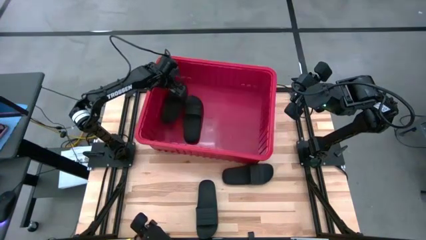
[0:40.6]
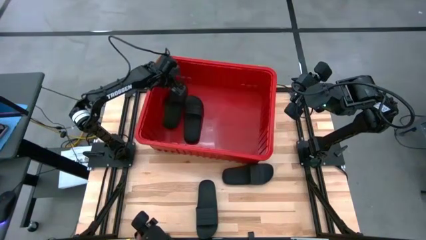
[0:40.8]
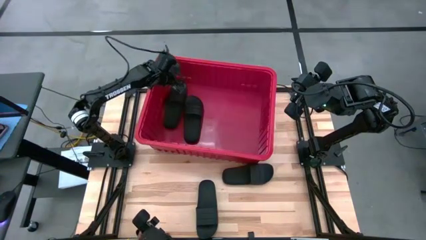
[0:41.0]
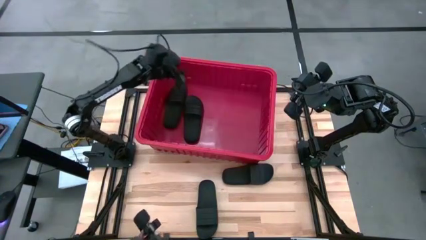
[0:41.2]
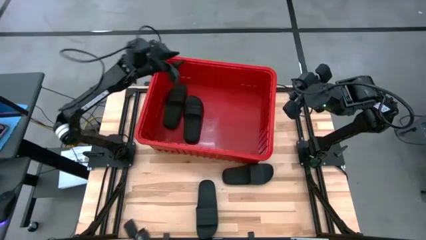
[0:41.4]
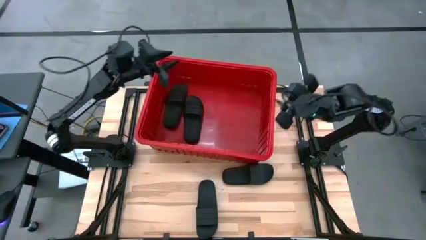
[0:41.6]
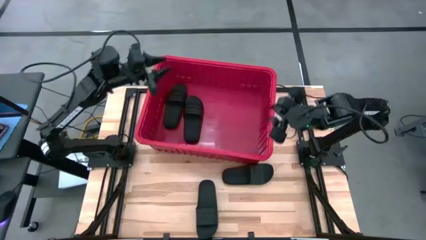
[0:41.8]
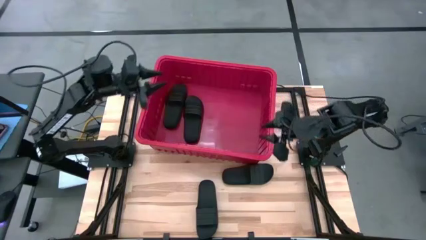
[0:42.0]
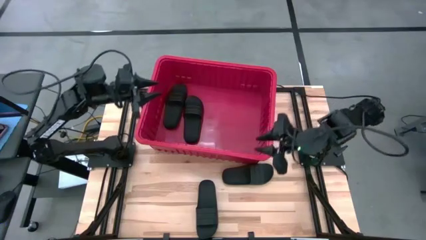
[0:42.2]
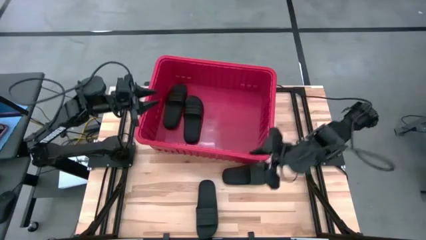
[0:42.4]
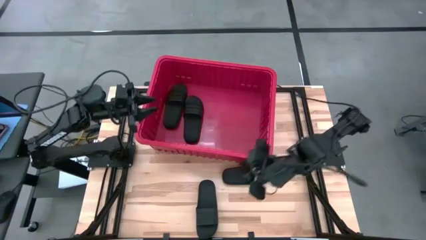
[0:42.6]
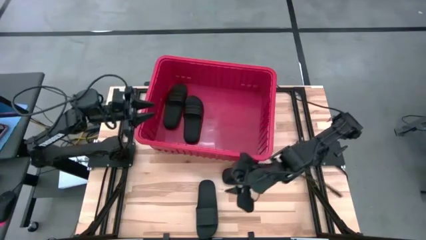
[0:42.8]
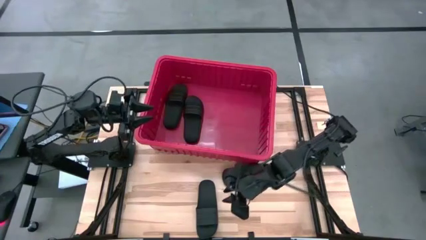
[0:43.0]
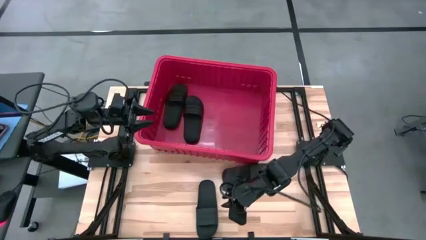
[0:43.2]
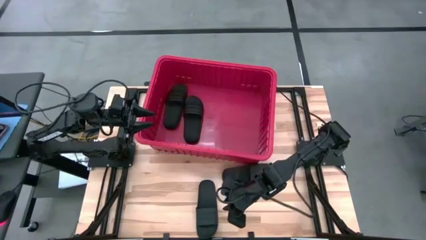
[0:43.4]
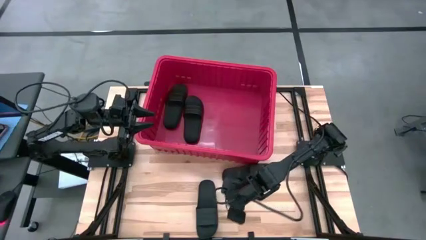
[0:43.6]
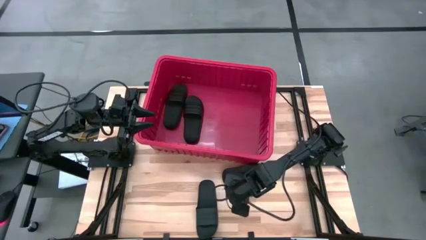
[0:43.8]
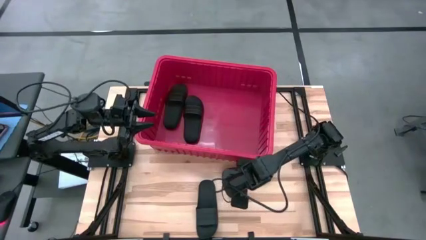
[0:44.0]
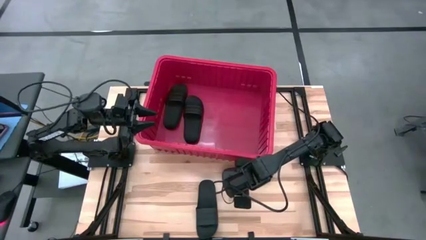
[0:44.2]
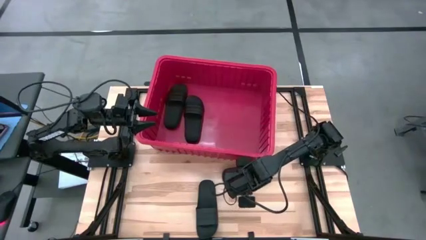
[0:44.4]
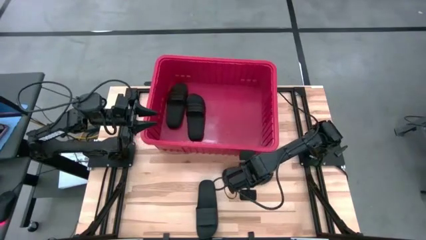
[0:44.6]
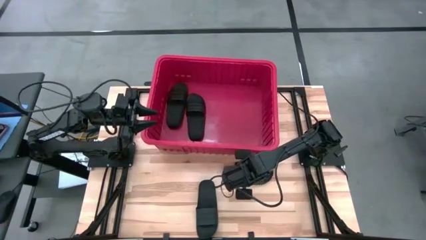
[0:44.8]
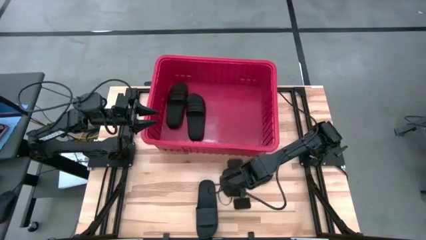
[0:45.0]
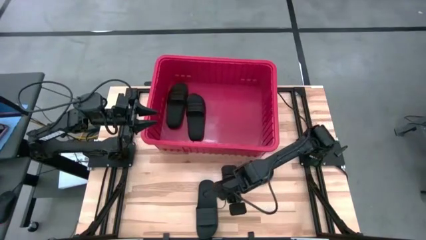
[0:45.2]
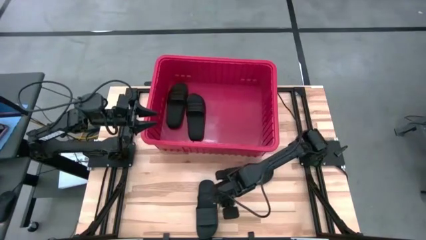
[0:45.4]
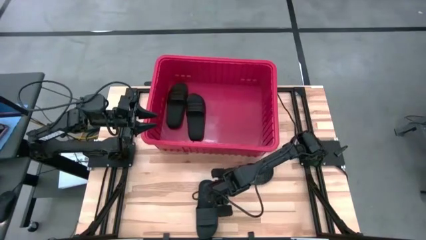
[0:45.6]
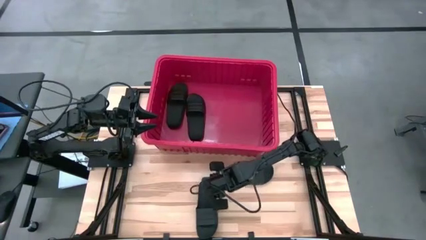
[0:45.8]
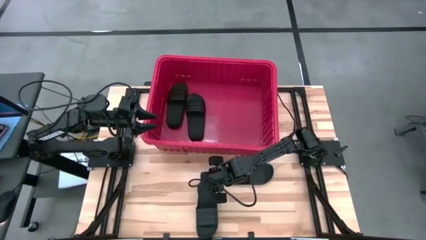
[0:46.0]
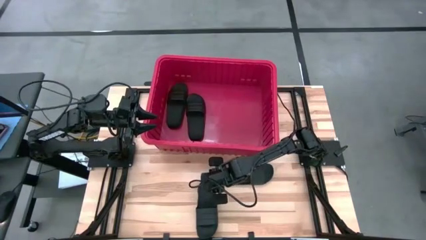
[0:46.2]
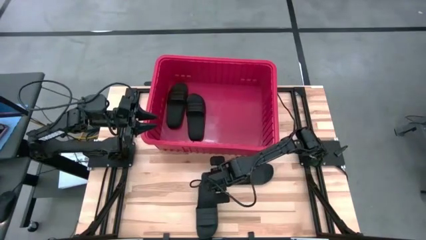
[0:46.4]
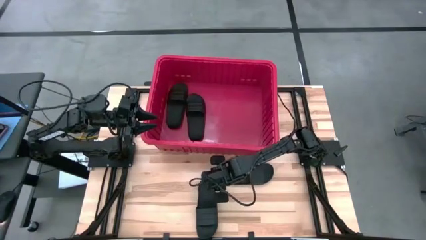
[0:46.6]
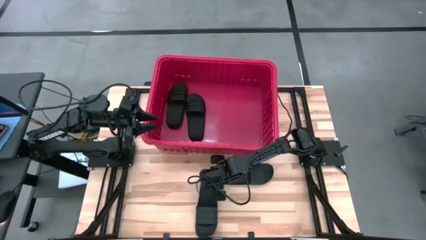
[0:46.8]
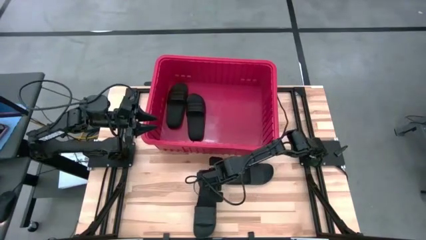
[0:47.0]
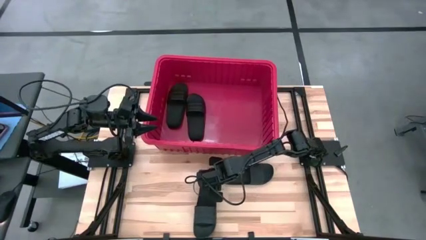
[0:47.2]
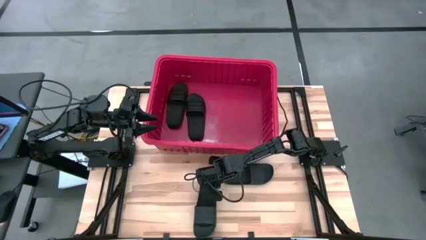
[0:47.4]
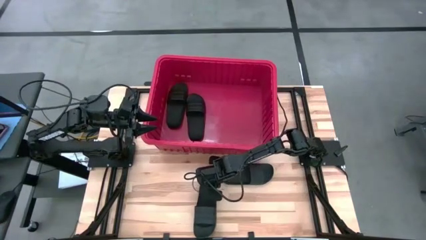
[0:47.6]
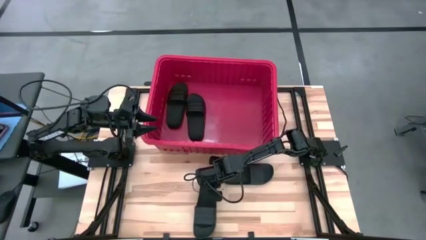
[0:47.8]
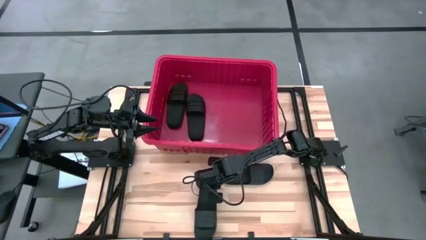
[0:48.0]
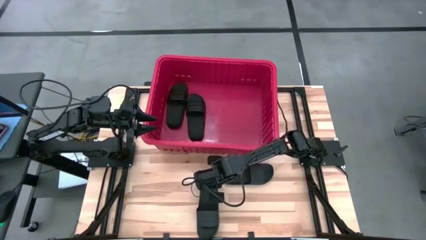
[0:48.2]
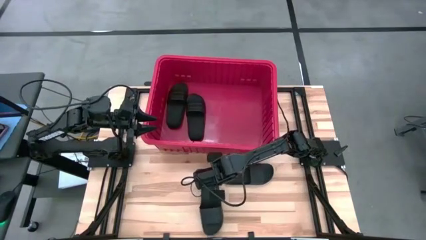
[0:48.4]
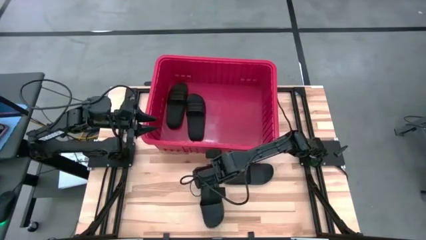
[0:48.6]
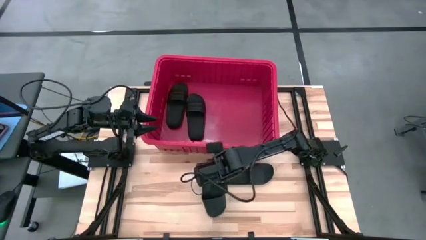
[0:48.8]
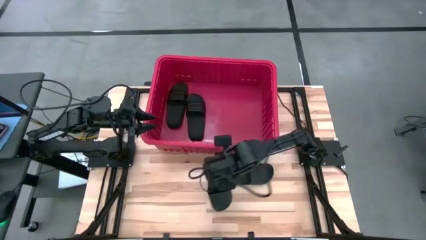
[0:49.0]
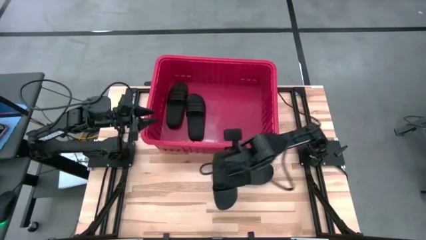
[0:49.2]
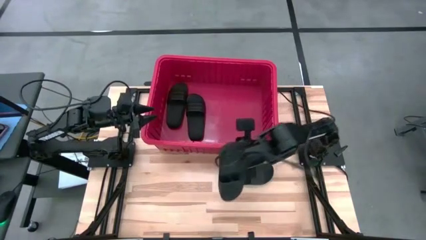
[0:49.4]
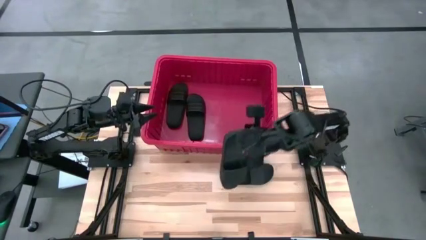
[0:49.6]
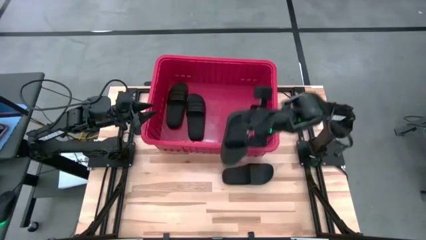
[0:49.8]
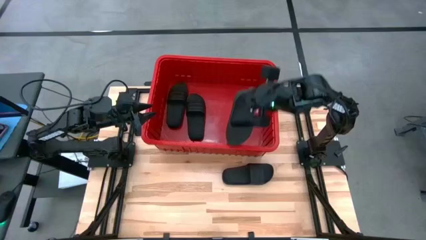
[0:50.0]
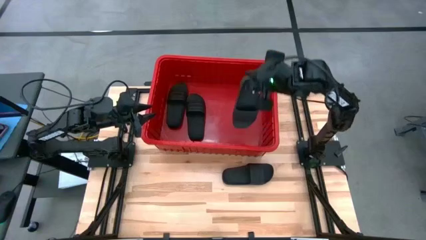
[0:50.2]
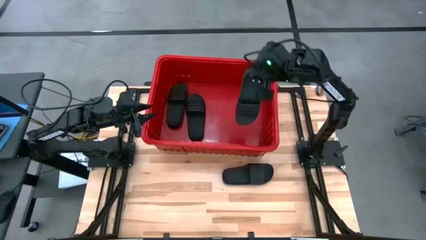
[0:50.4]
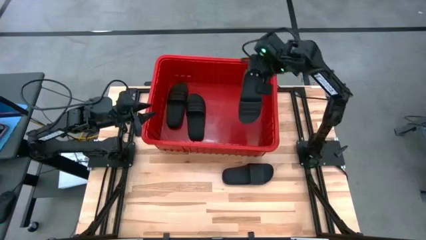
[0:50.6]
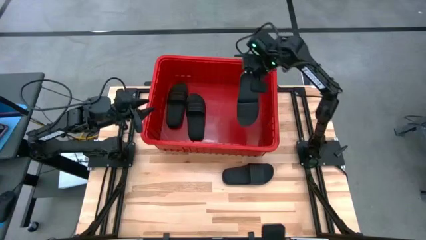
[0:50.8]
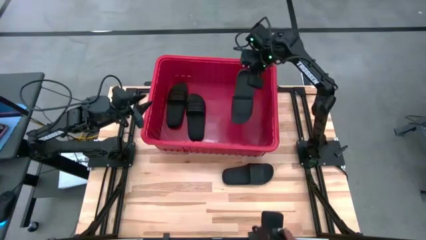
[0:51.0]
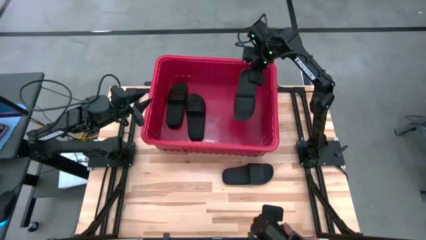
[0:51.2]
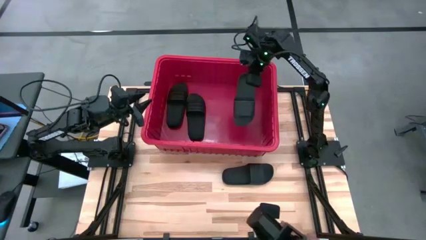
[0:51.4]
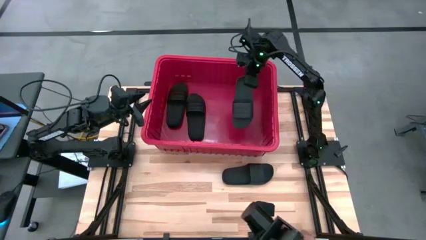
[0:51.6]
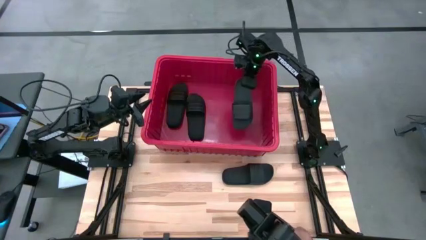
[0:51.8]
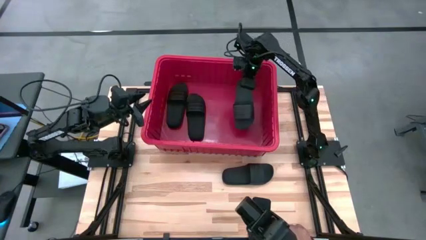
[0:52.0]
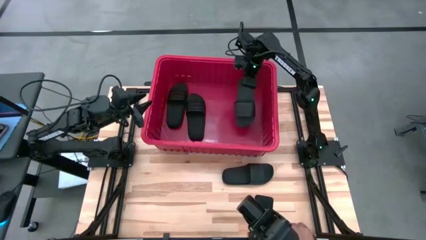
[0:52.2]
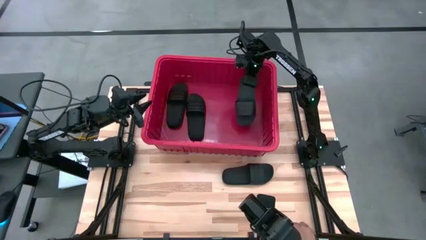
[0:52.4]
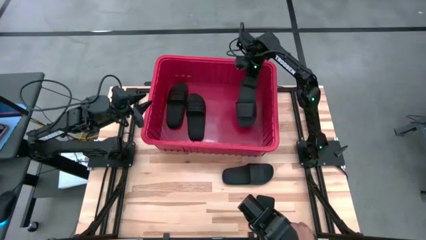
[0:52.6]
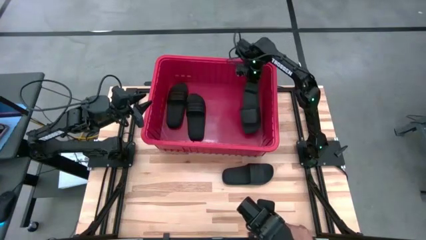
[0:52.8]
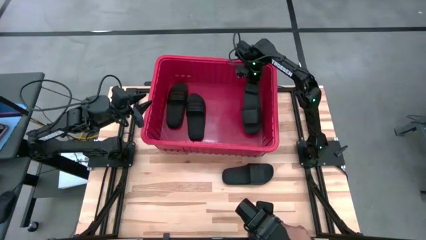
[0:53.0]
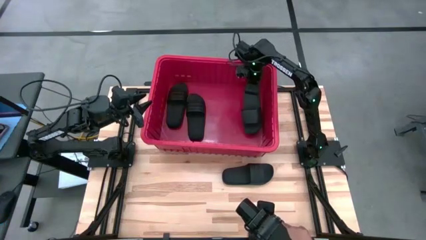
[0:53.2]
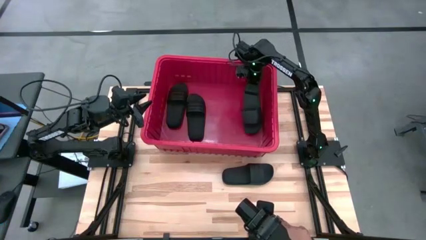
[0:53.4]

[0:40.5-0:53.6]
Task: Pick and place slides into bin
Put the black slide into the red organizer bin
